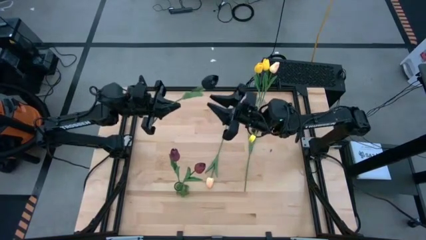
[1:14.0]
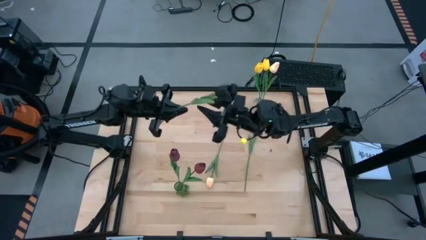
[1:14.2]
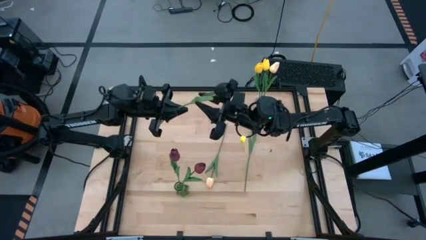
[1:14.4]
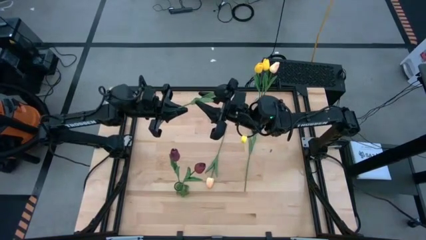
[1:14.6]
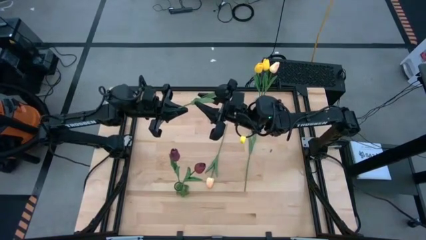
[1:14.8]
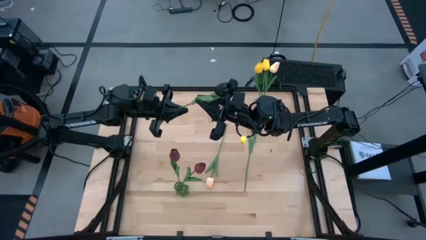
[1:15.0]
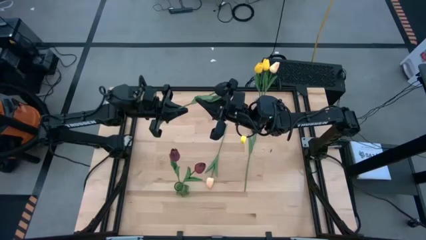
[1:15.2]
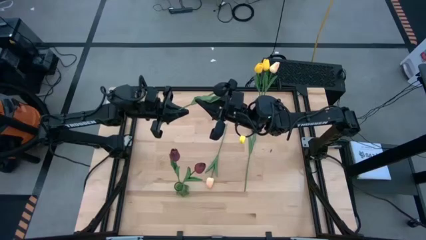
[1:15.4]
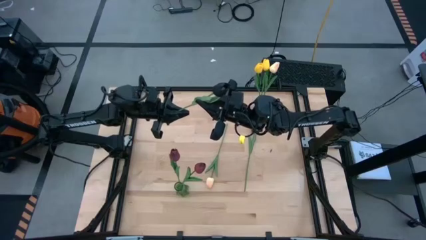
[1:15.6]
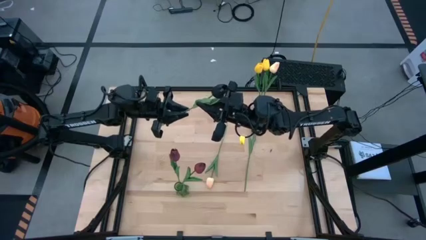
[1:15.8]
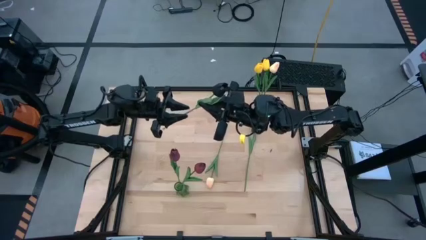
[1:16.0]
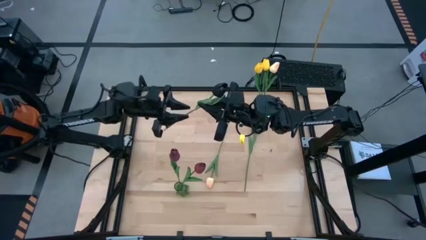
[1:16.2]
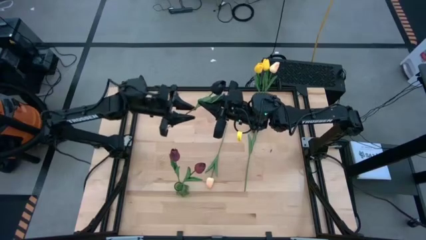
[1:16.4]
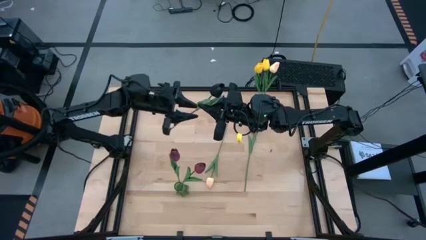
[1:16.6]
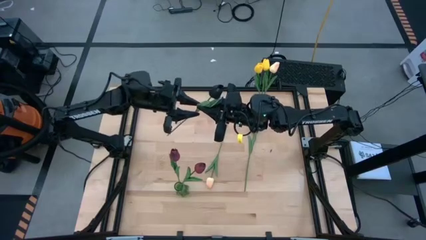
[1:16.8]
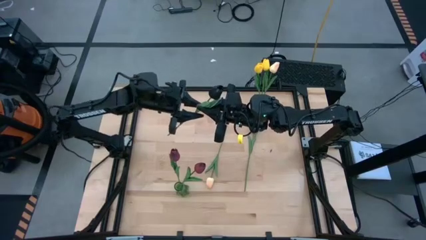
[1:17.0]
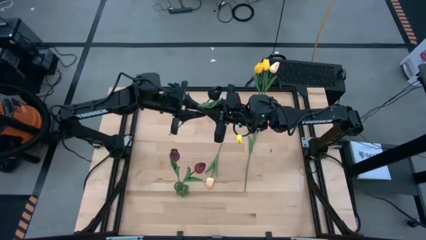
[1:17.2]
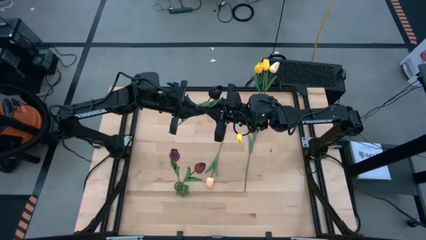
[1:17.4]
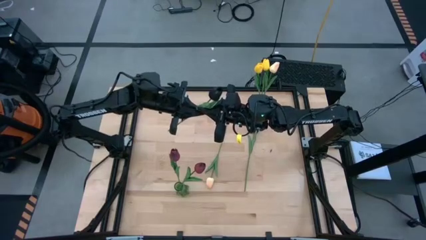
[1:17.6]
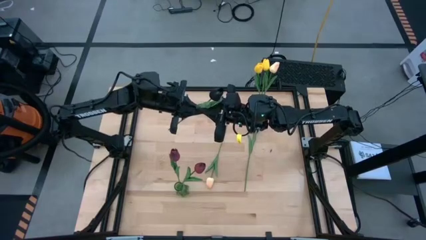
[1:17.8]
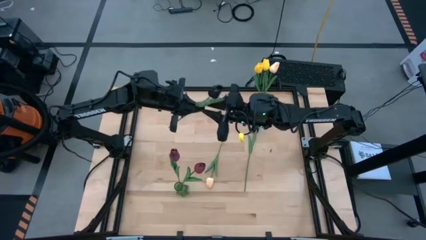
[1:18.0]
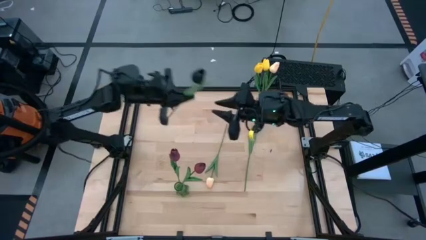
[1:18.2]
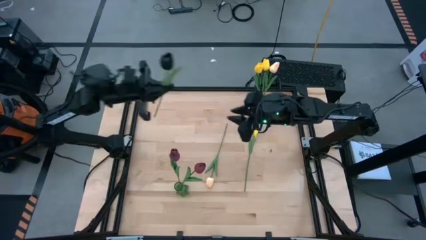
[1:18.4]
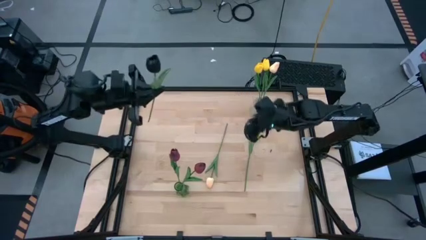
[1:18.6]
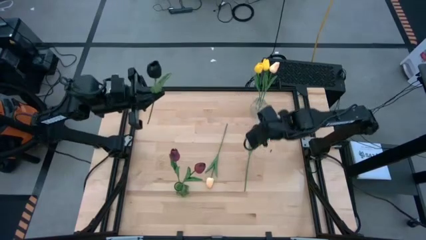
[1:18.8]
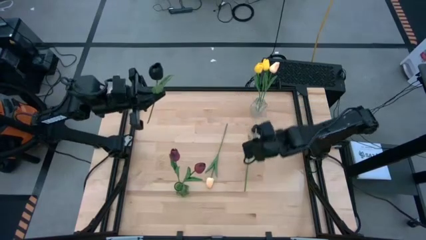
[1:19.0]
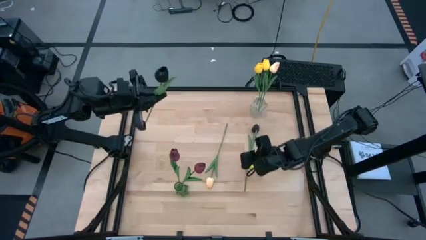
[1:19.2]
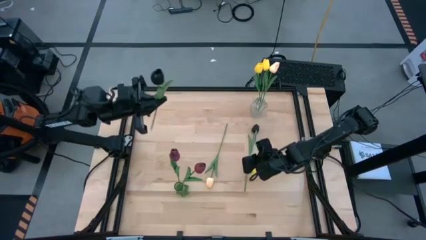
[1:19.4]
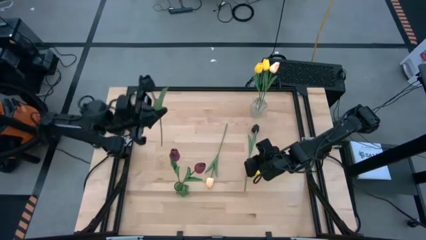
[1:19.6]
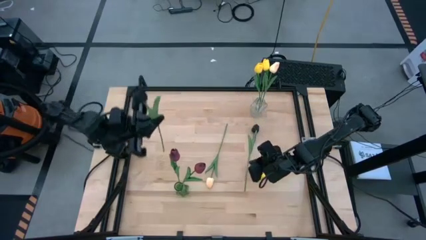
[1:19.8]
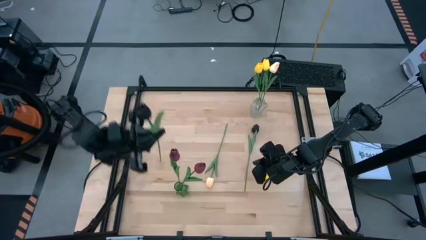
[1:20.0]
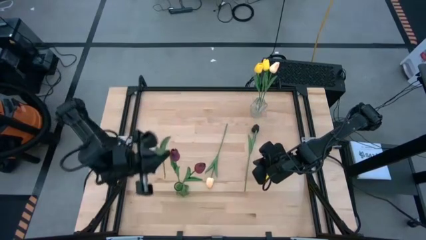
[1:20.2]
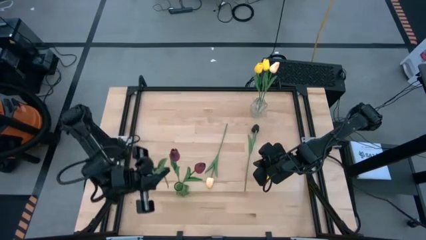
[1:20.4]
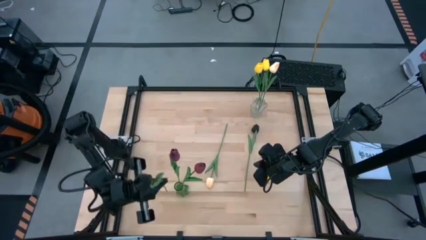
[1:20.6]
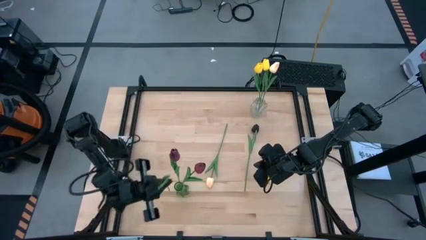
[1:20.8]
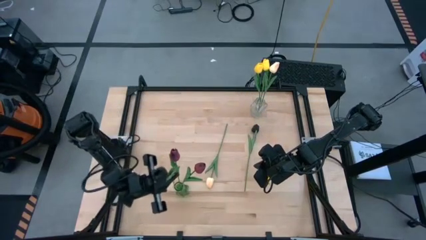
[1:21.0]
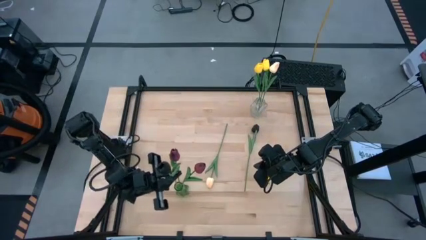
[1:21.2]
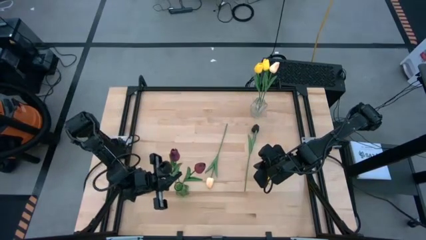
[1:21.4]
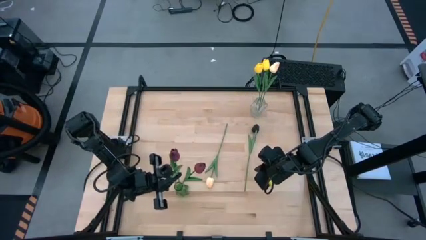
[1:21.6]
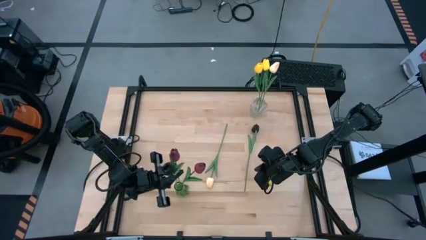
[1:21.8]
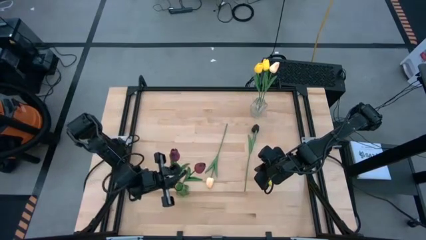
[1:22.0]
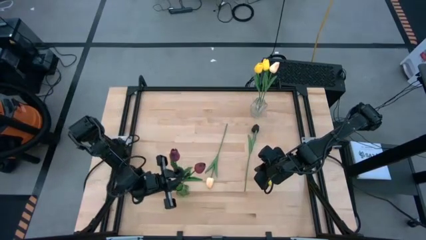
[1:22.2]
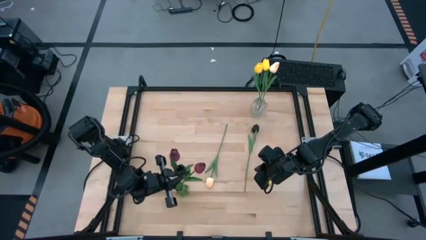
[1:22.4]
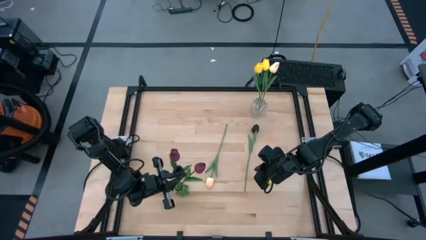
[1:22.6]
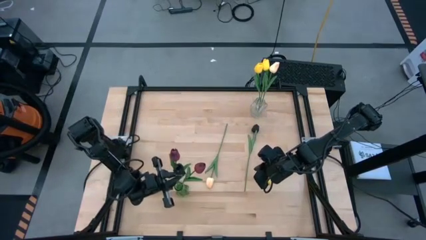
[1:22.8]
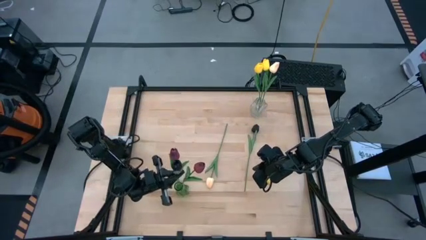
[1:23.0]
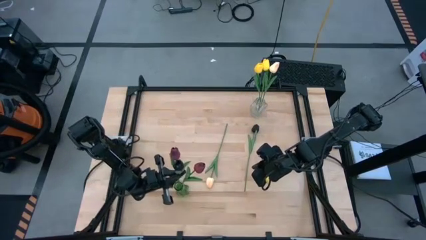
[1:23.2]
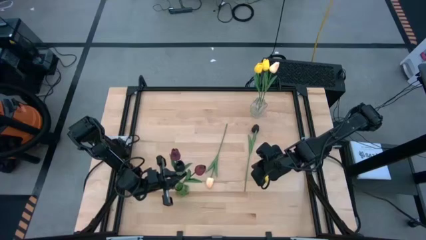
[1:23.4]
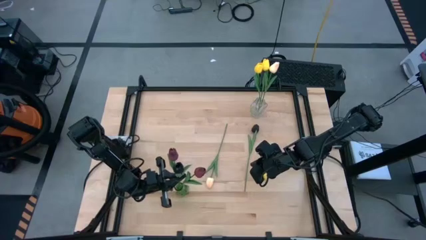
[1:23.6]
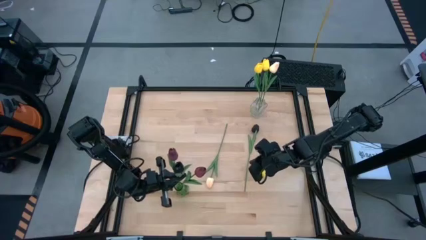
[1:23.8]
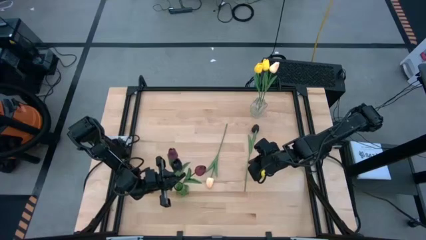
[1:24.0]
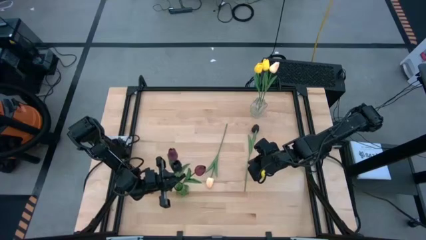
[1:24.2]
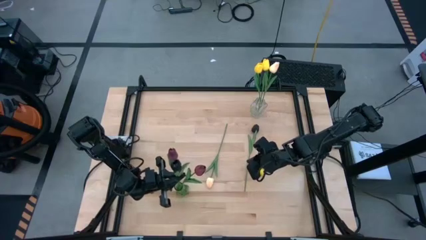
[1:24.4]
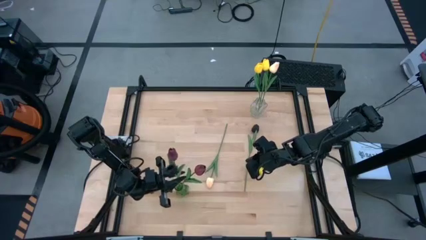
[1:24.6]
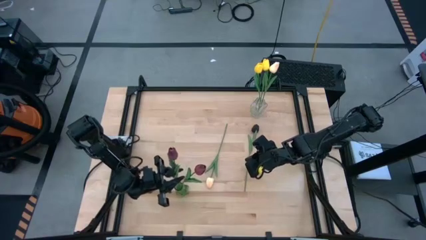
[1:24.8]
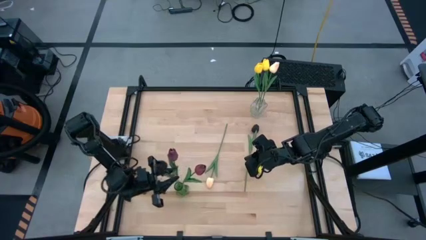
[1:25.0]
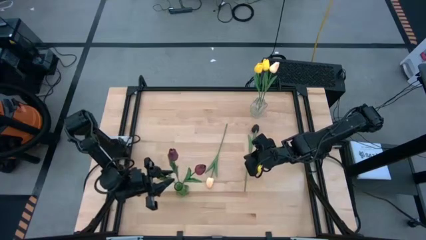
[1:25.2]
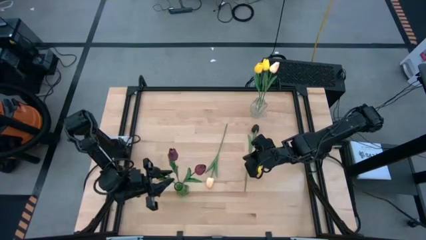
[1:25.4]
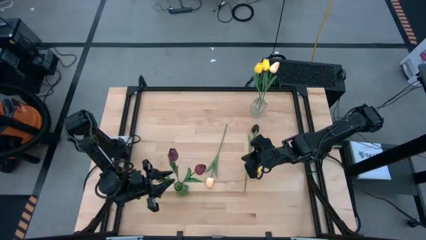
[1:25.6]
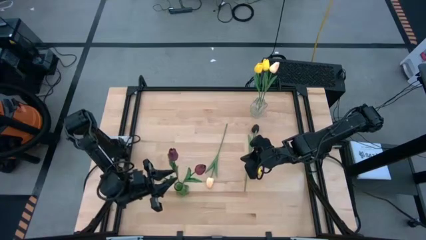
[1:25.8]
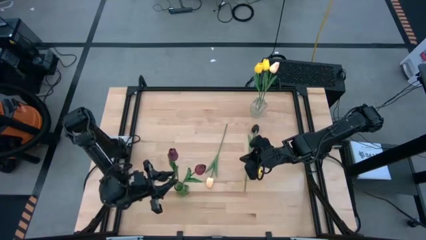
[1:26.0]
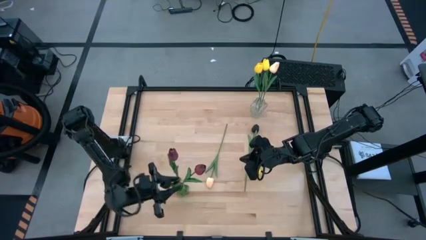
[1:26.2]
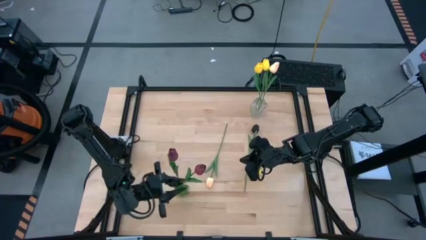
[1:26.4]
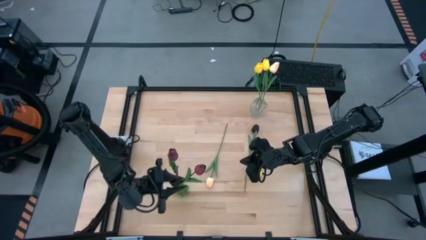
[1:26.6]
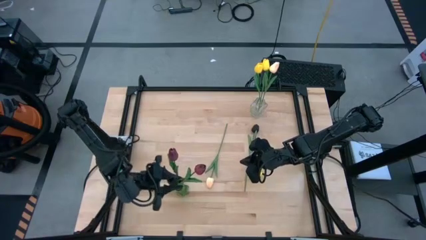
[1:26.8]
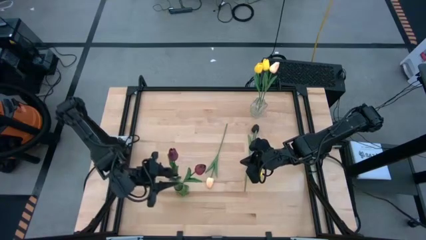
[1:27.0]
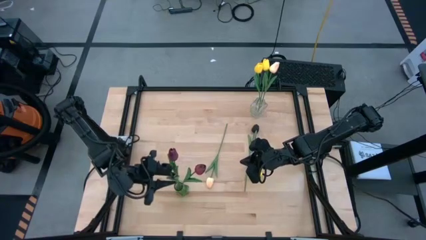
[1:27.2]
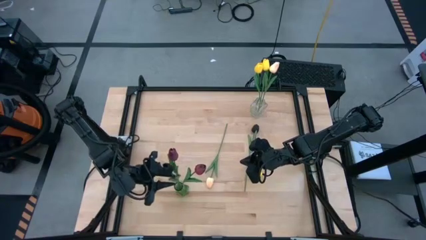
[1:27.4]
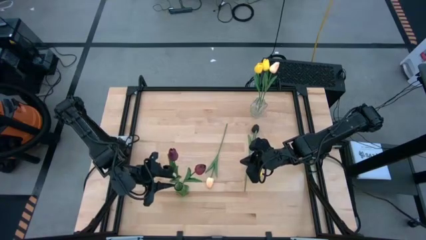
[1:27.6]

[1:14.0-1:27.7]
Task: Sort flowers into vase by color
Put the bottom black flower into the vase
